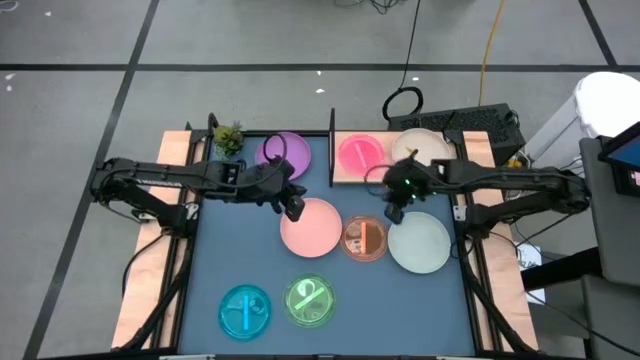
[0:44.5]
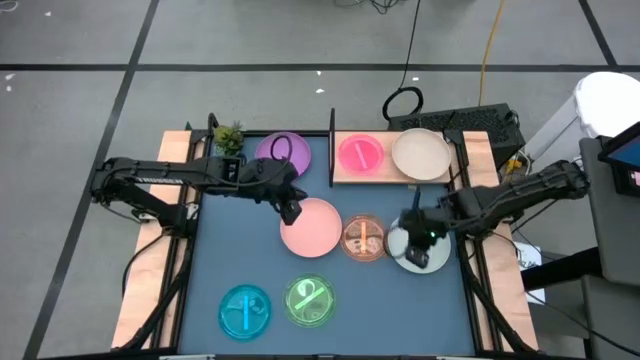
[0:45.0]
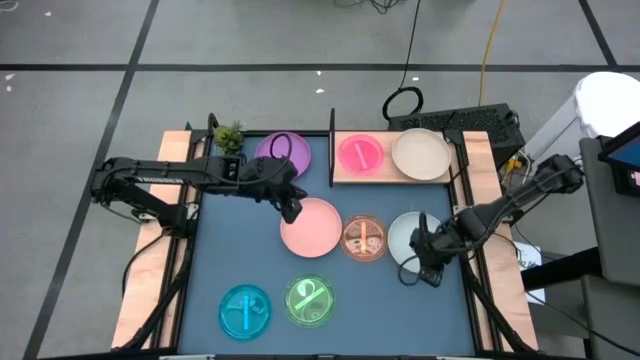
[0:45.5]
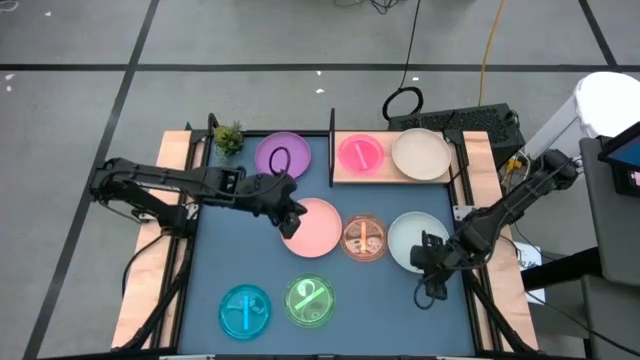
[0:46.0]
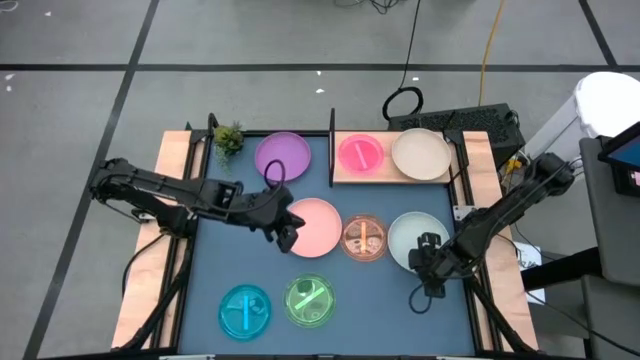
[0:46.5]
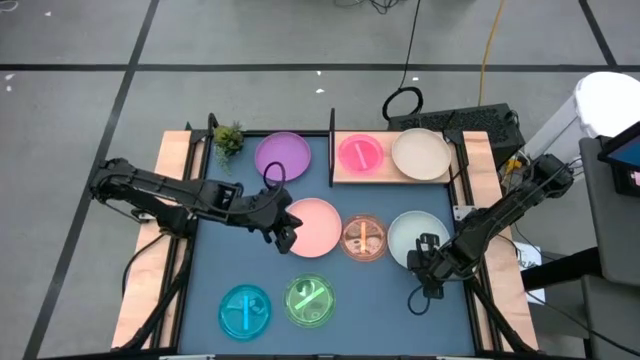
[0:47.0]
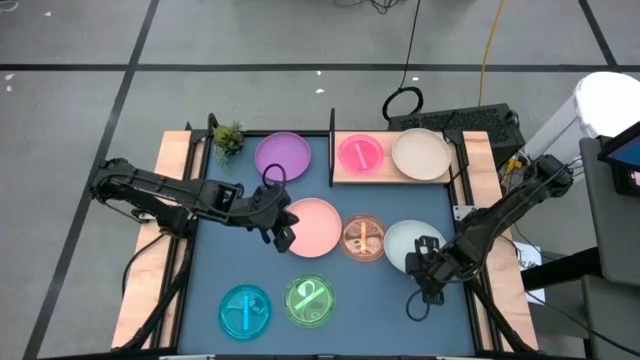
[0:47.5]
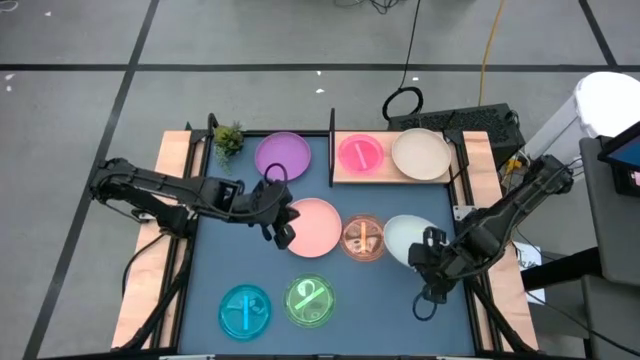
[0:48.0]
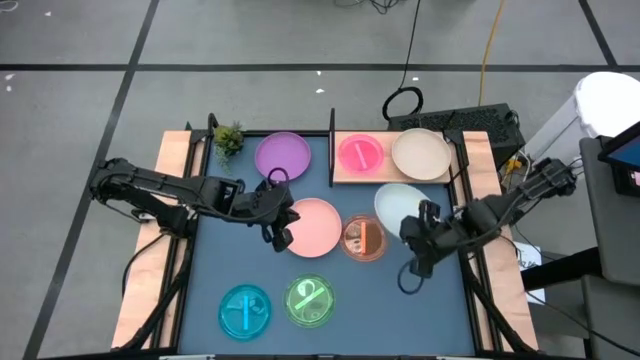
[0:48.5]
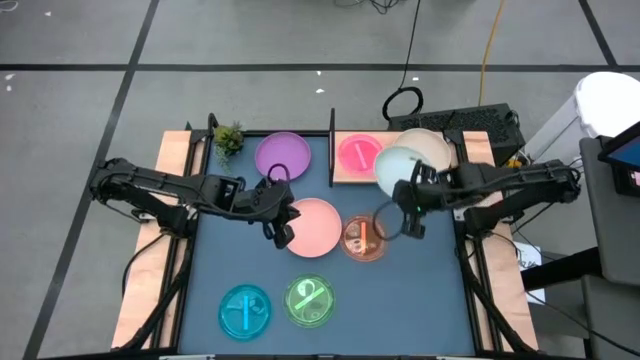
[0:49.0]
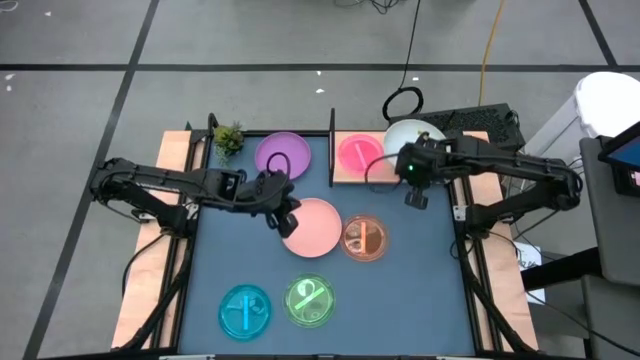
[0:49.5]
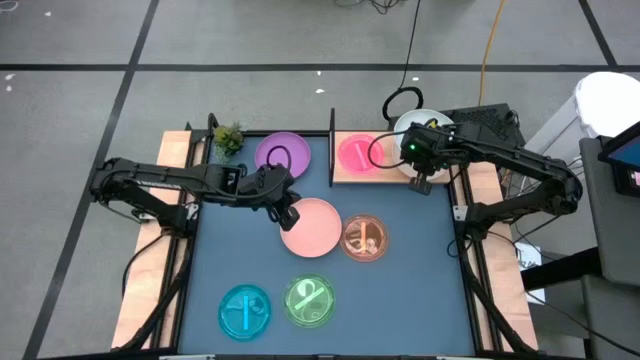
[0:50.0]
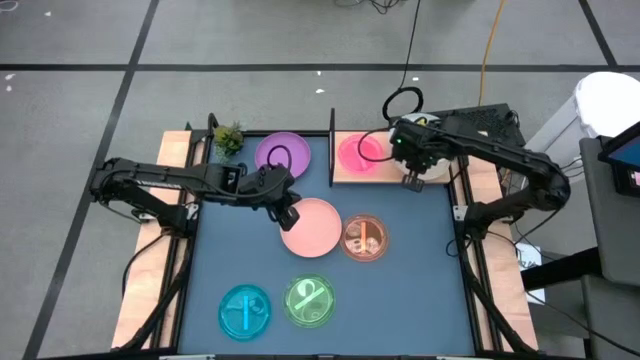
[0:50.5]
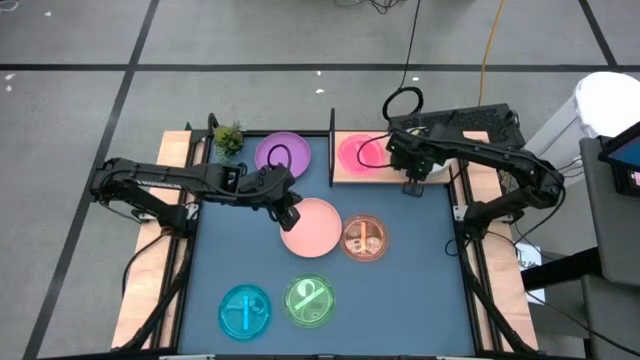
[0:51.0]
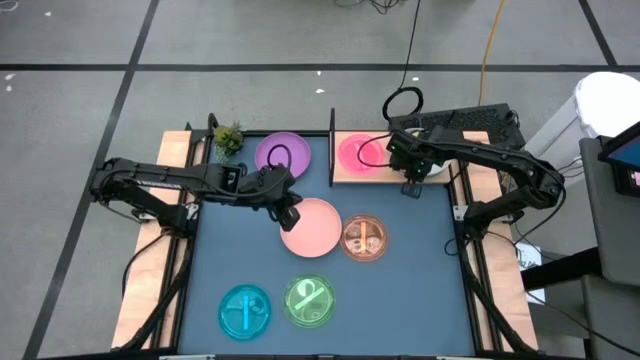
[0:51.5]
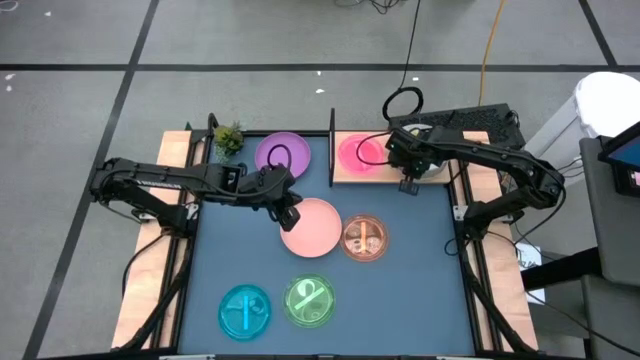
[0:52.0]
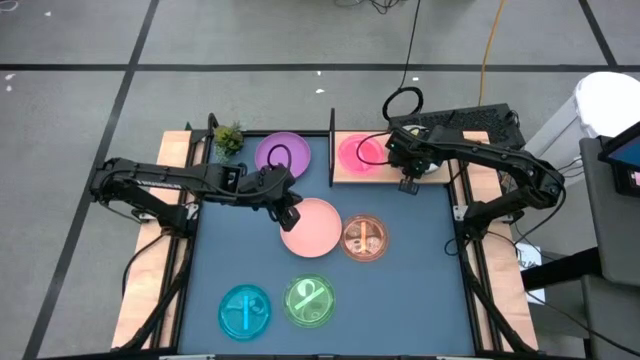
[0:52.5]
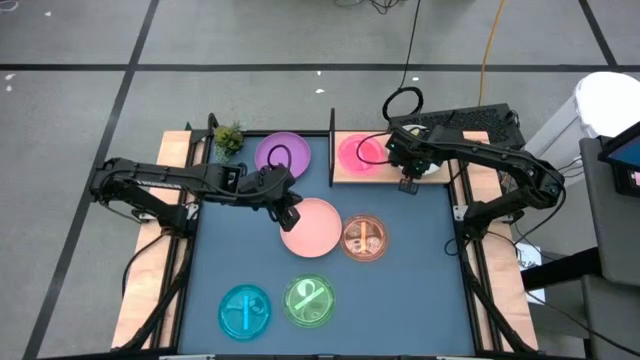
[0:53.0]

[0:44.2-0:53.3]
Task: Place and stack plates onto a shelf
Stack the light blue plate on the gray plate on the shelf

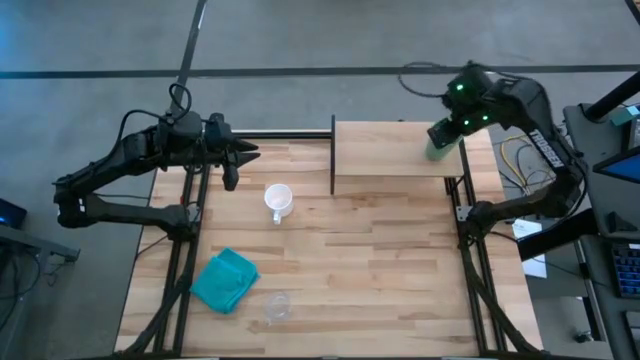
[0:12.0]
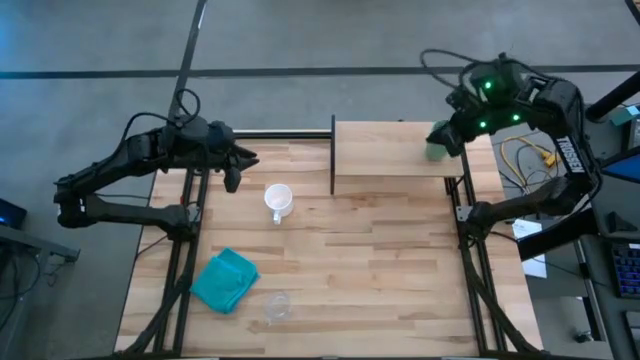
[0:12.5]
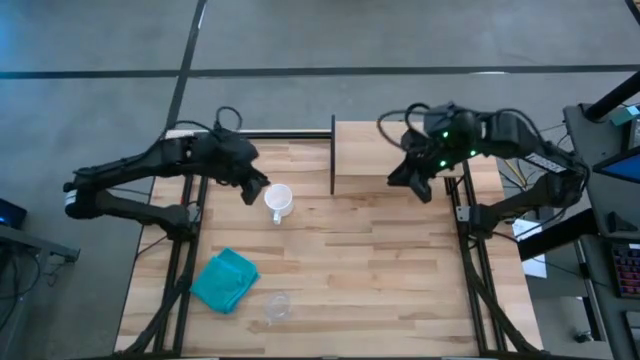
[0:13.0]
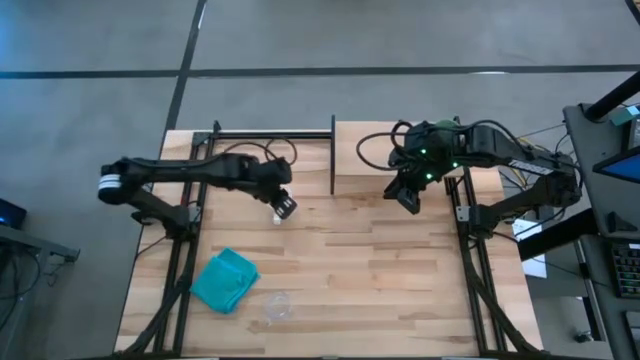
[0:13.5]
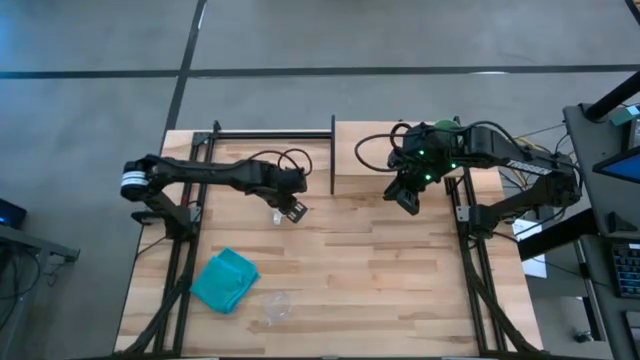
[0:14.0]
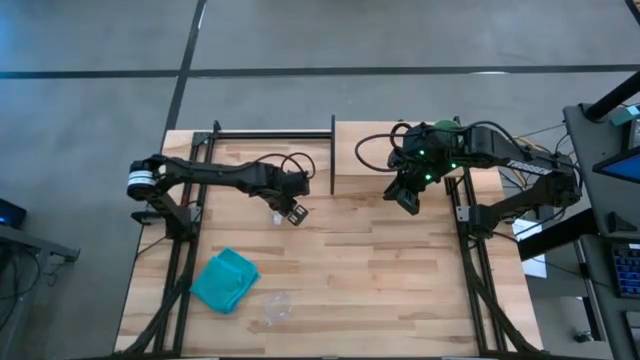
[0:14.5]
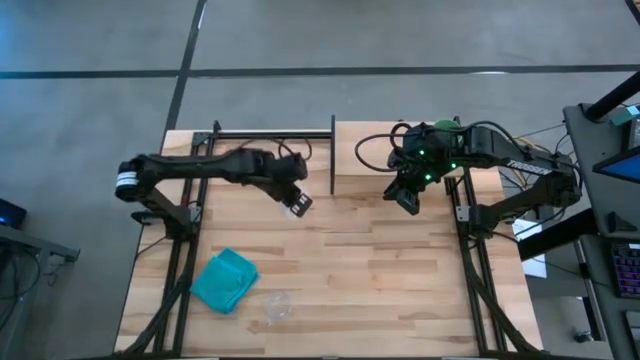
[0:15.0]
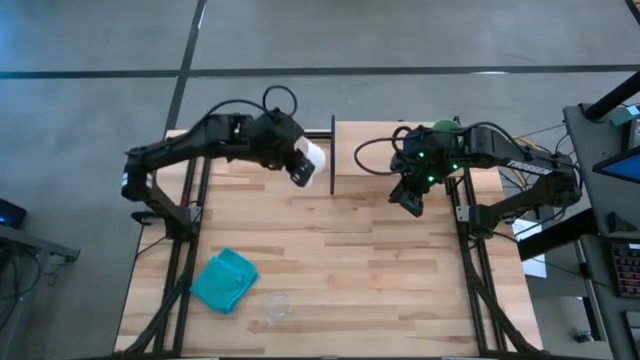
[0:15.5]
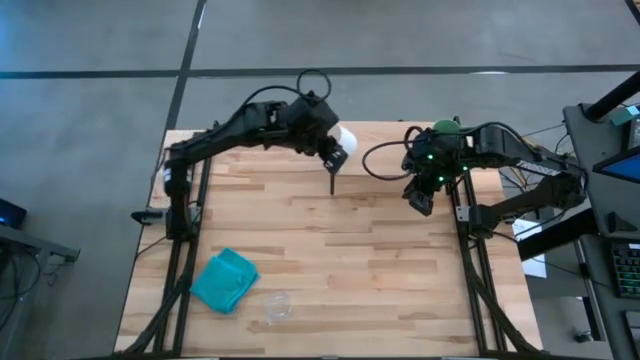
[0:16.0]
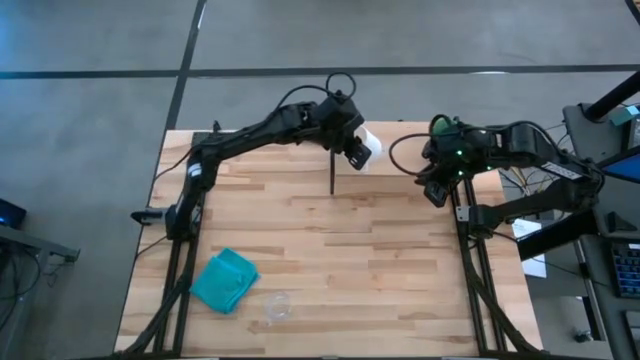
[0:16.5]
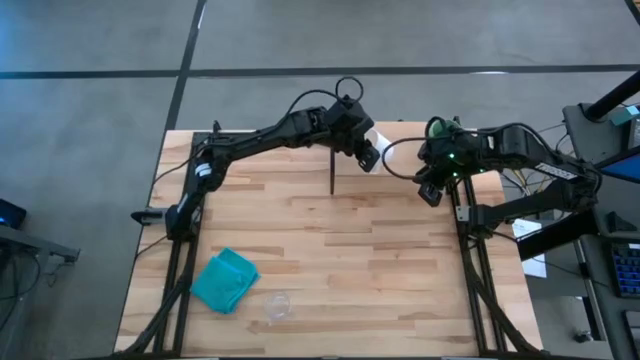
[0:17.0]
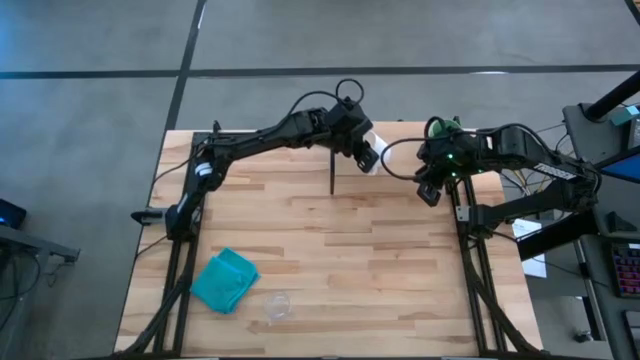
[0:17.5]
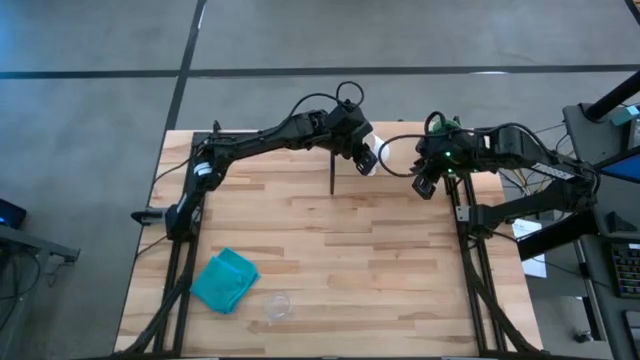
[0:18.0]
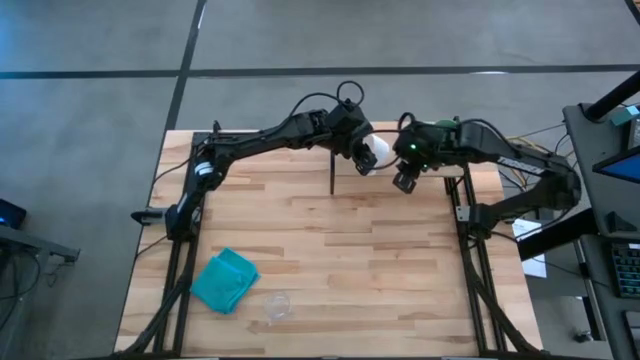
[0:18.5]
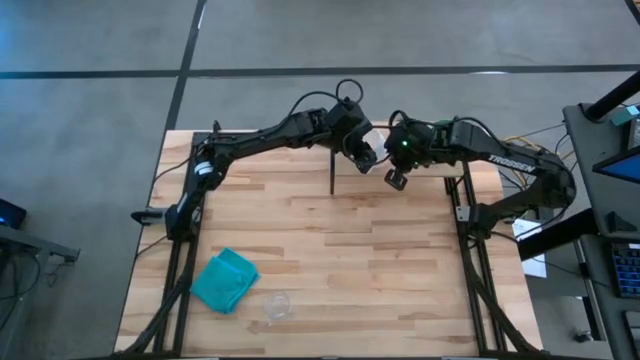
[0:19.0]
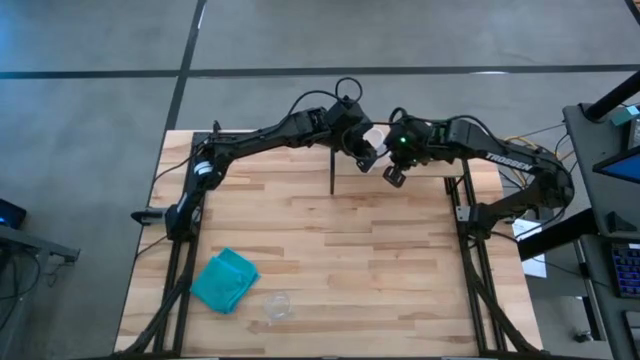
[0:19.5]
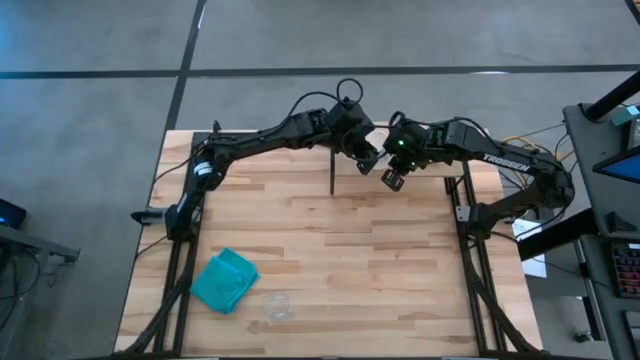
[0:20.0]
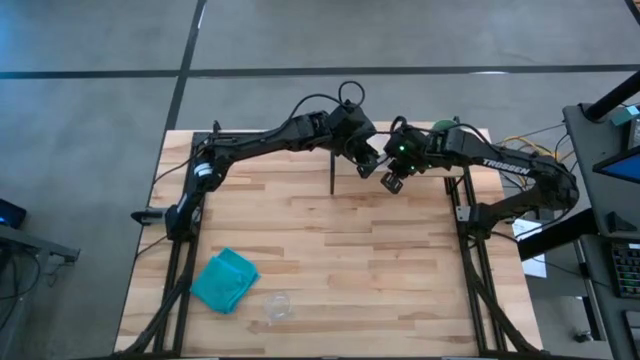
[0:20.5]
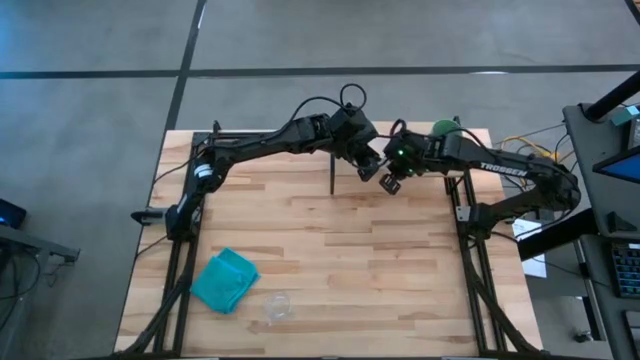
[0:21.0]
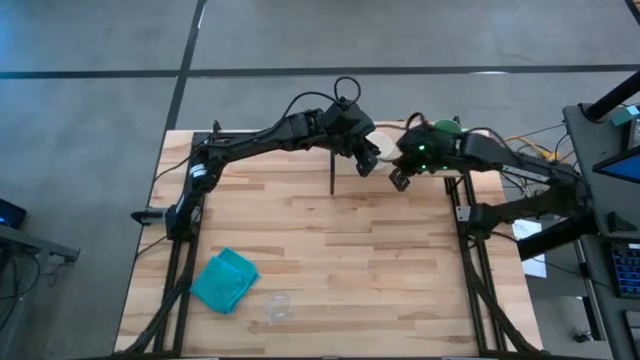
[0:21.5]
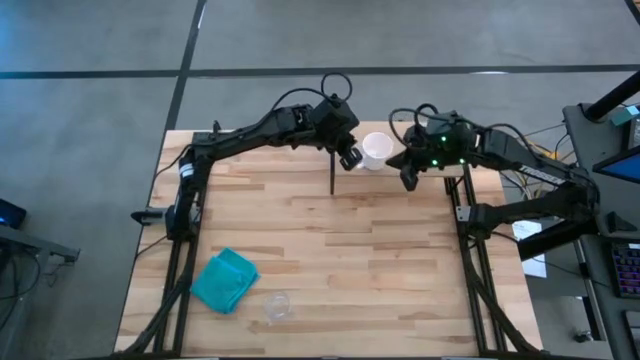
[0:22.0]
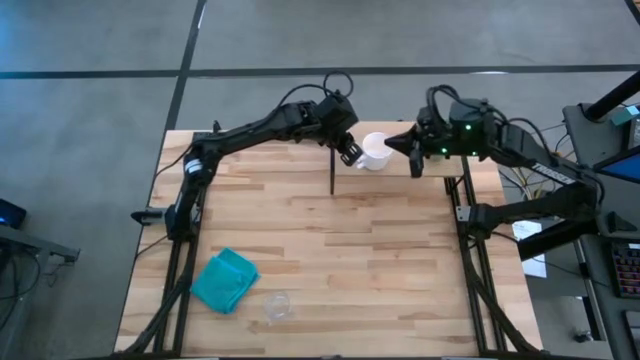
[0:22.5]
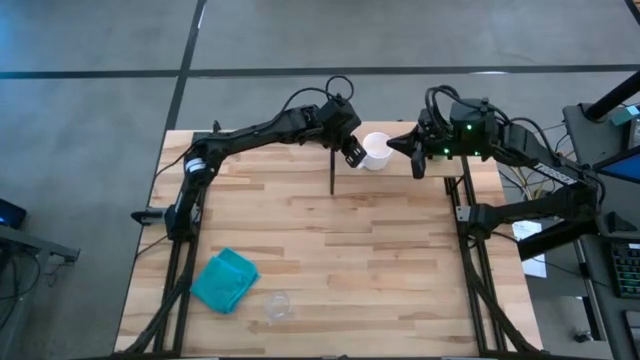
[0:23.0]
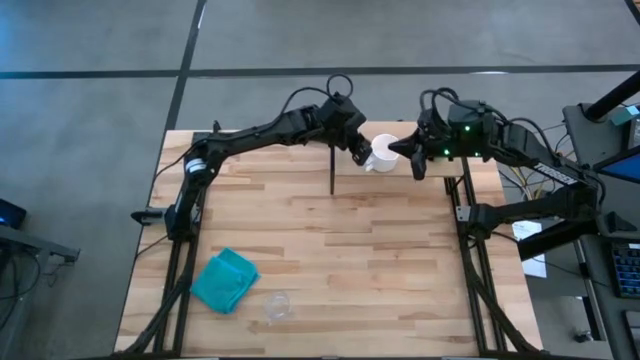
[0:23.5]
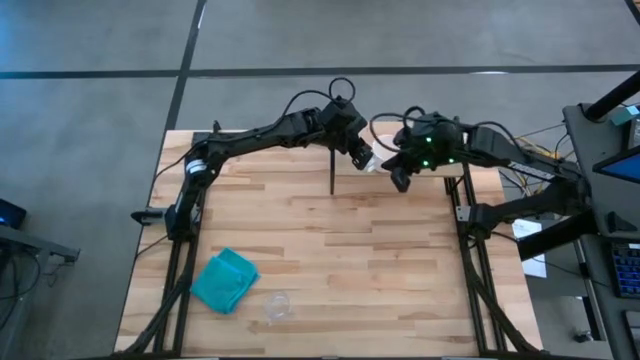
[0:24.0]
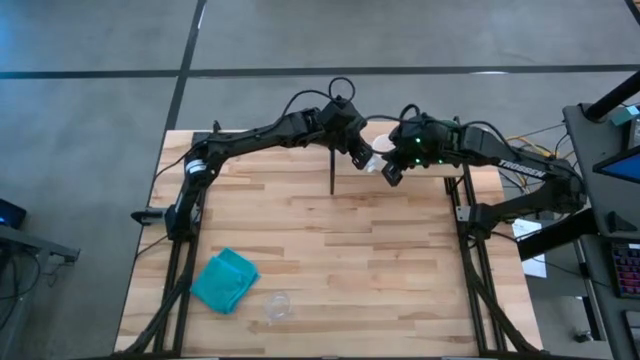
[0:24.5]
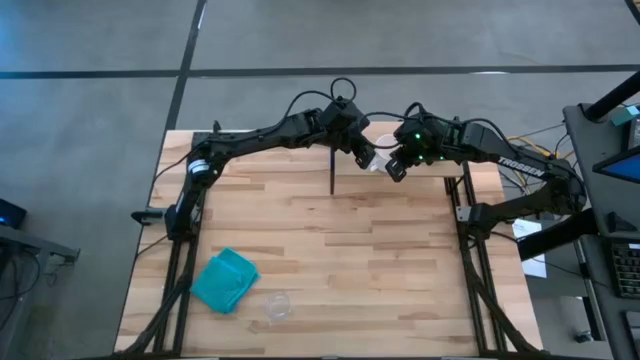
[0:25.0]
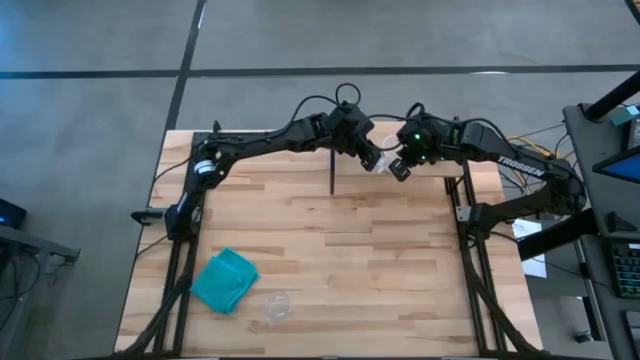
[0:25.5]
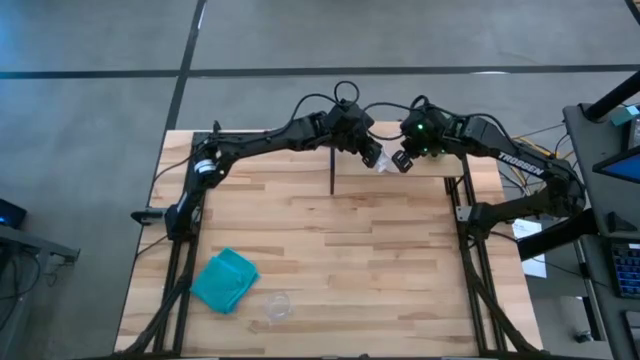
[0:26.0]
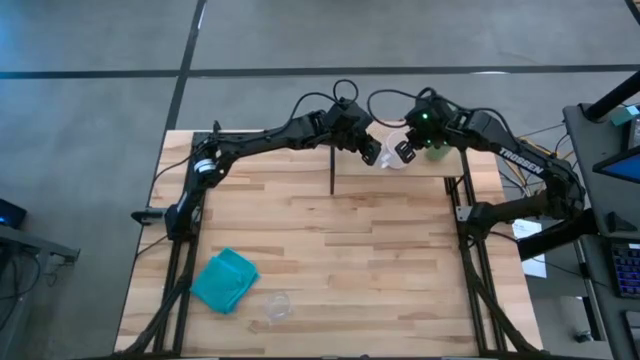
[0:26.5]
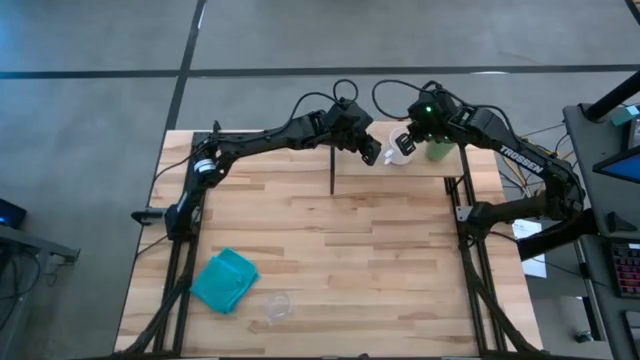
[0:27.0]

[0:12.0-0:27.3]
Task: Stack small to large cups/mugs on shelf
Put the white mug on the shelf
